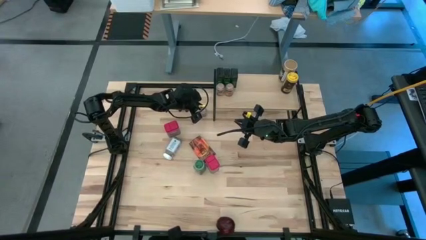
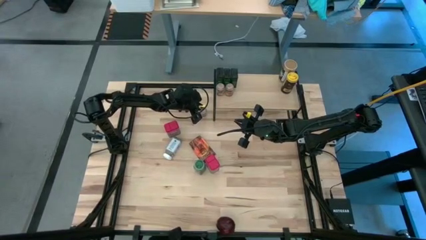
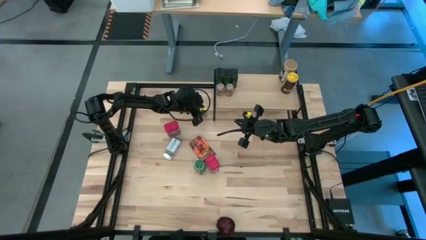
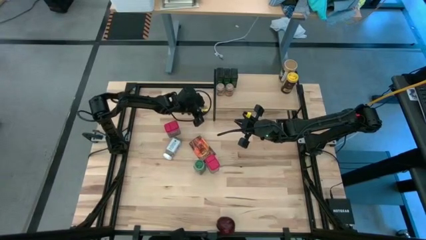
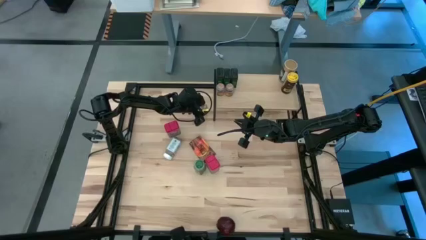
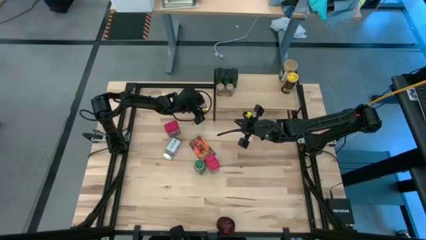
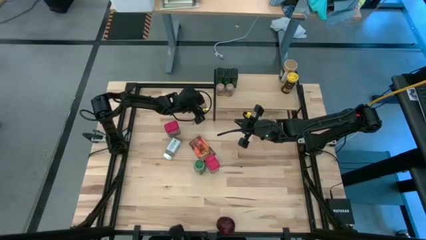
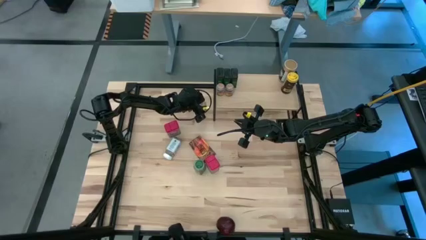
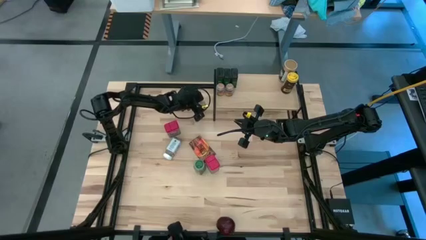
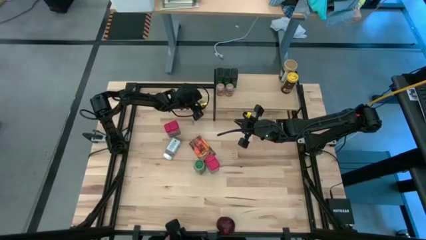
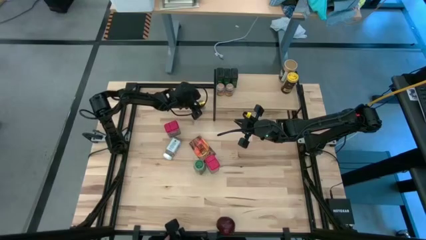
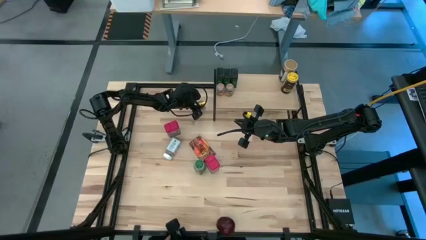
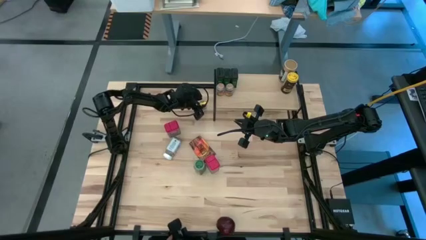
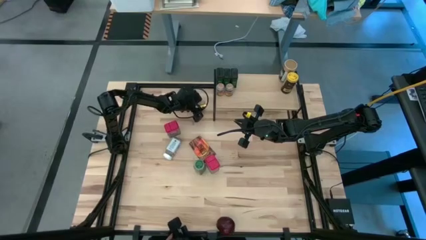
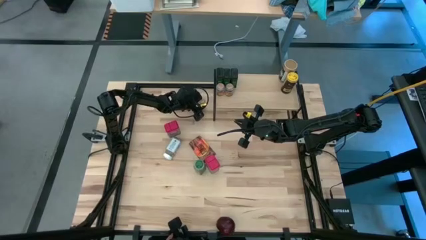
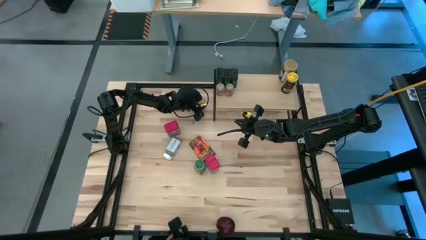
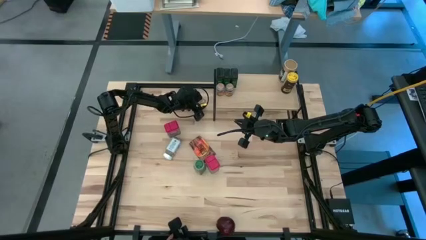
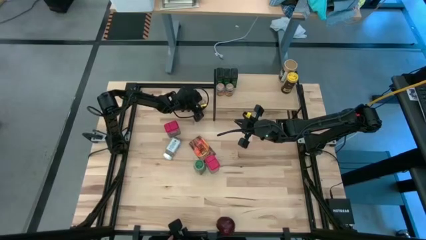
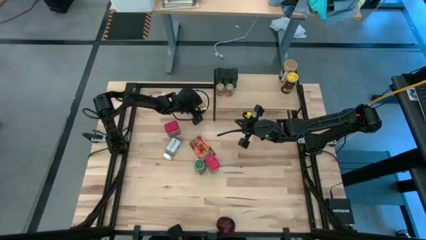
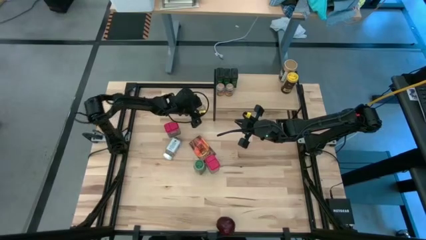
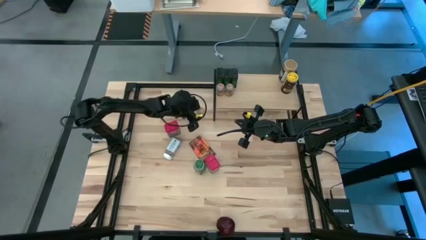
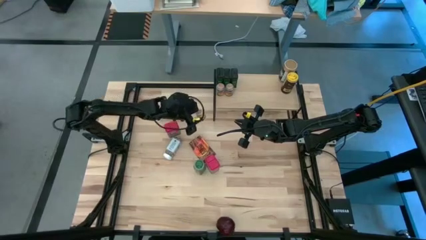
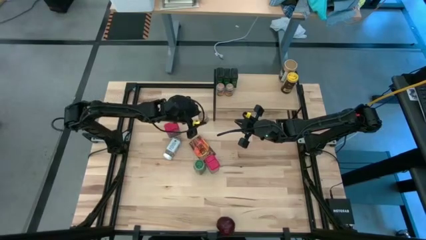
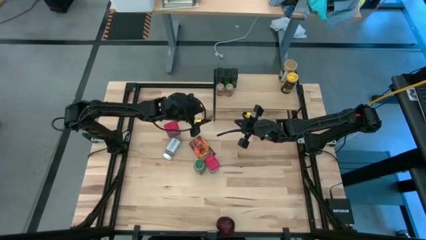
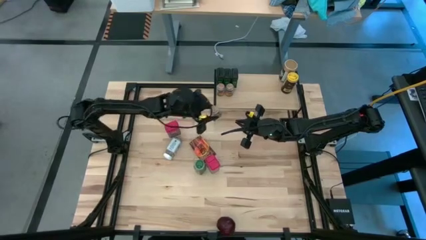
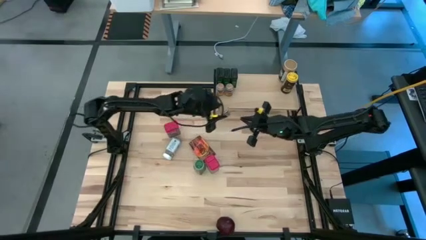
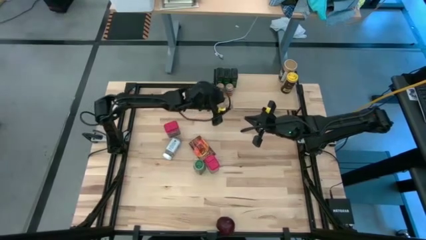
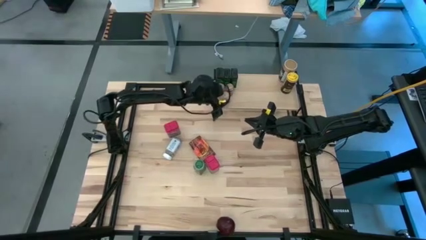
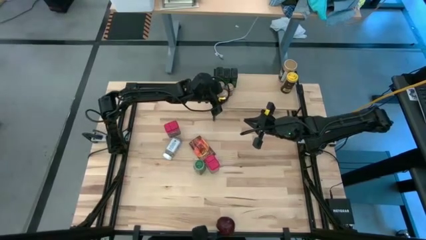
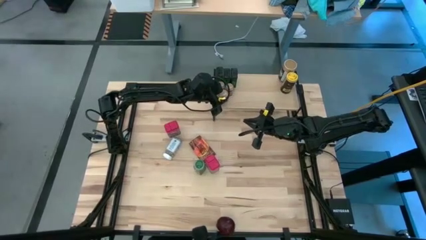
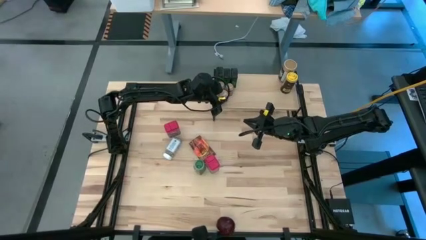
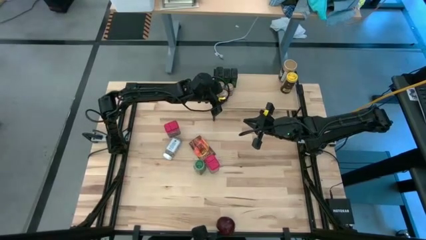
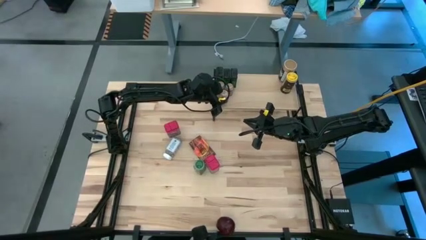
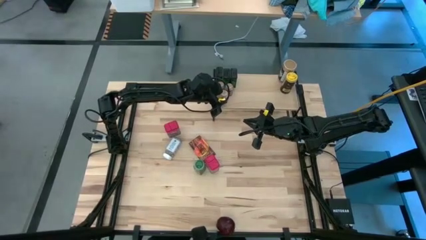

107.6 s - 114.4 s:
Task: Shelf spices
Put the bottom transparent seasoning bottle on the shelf

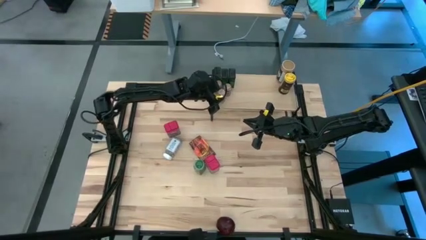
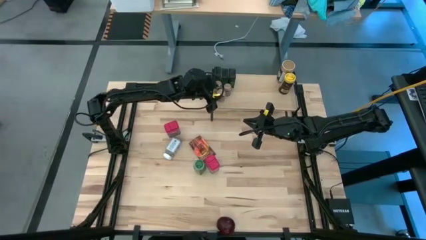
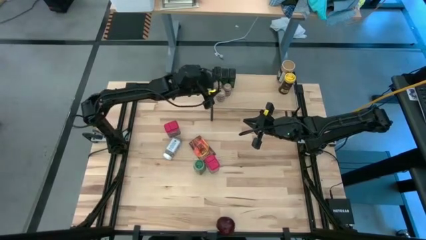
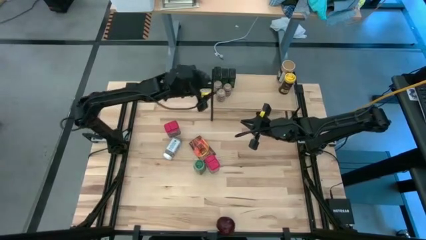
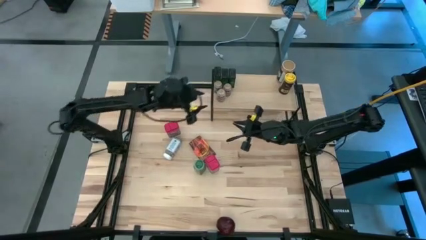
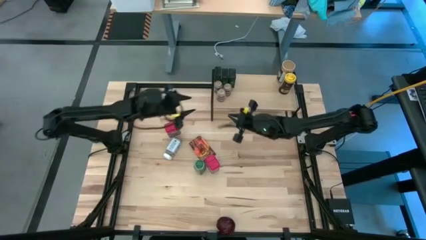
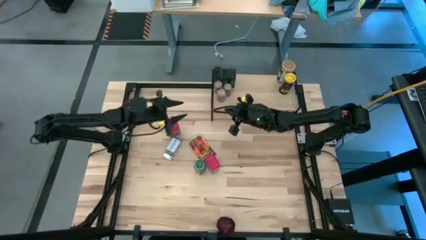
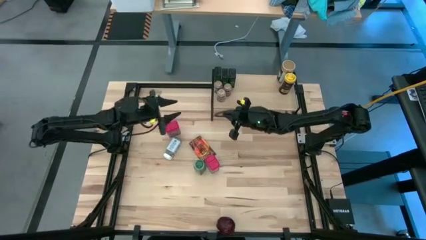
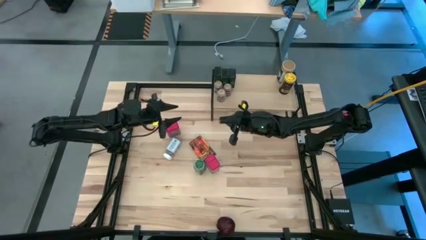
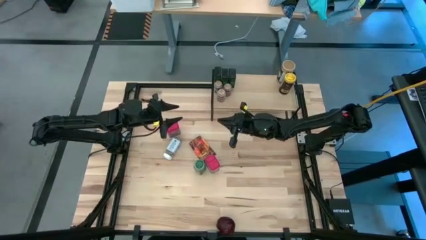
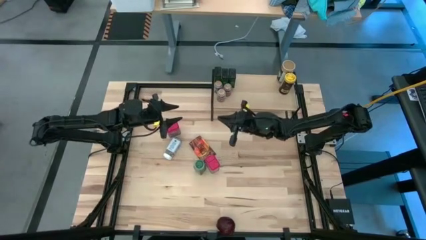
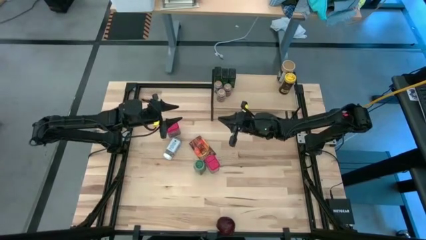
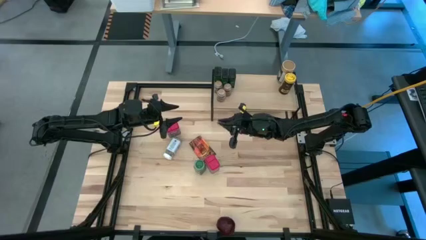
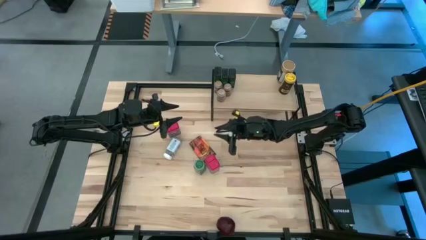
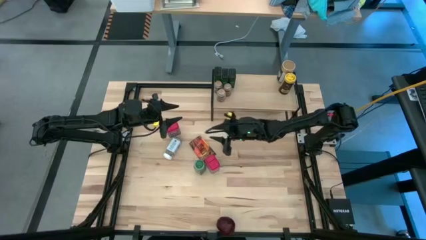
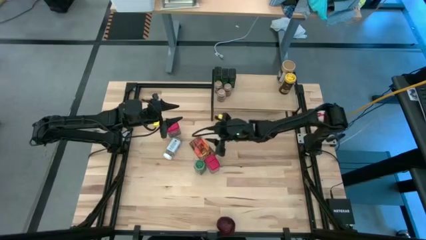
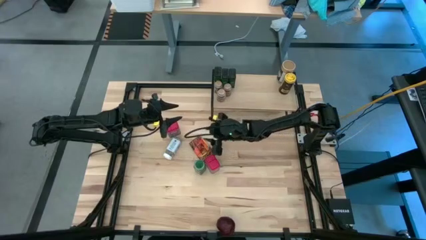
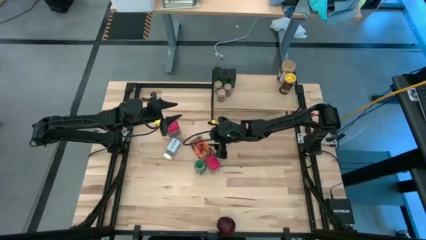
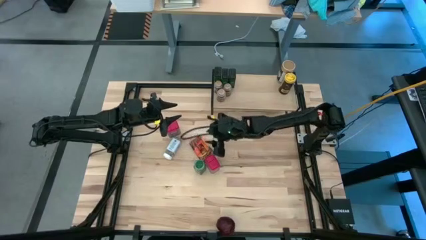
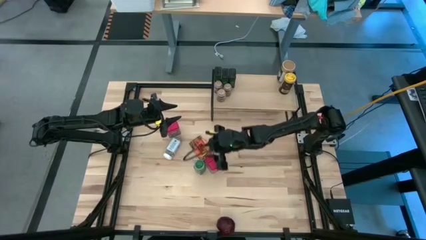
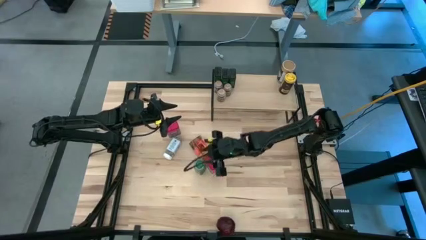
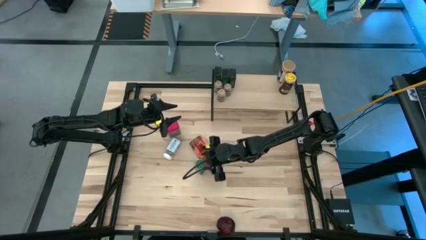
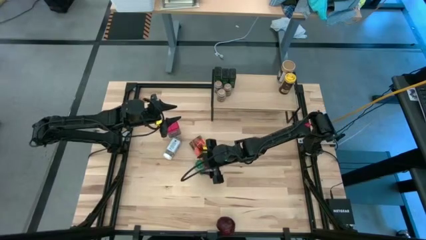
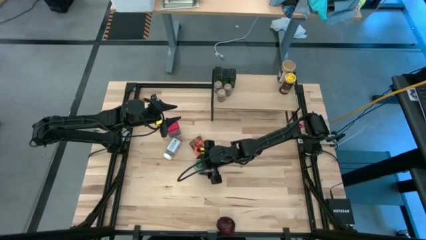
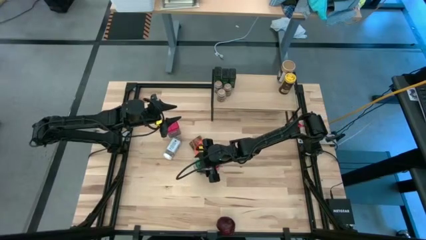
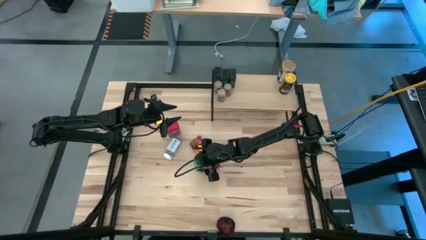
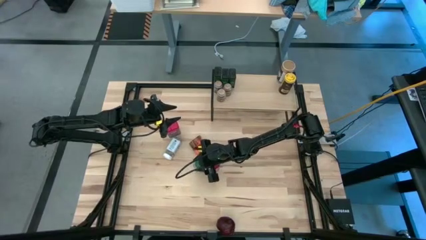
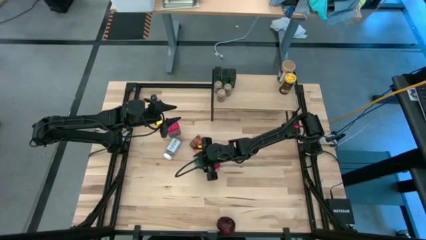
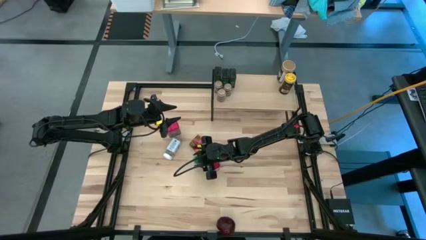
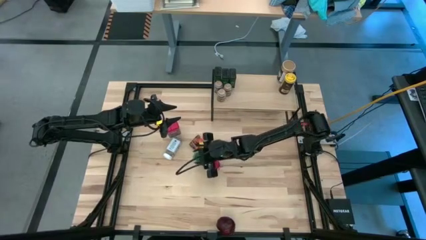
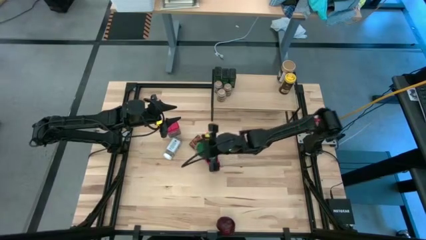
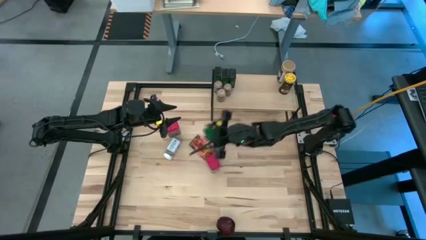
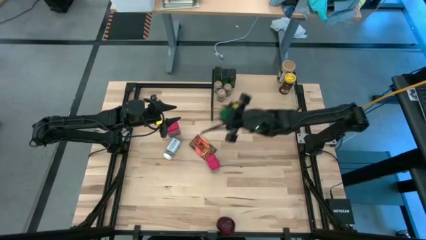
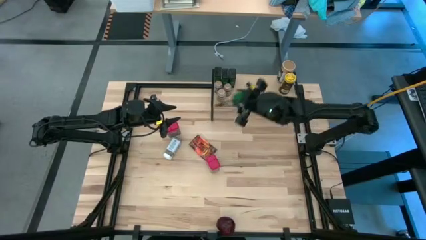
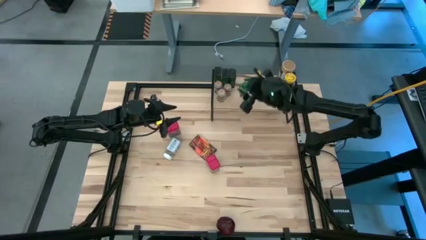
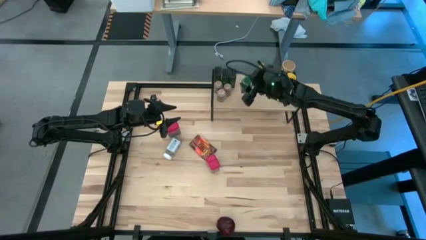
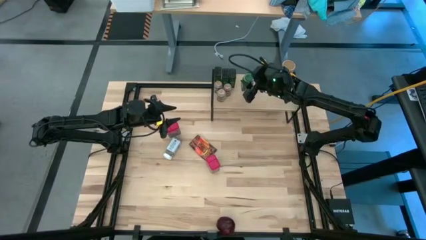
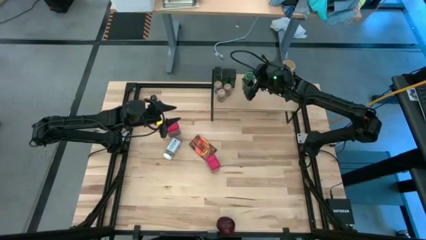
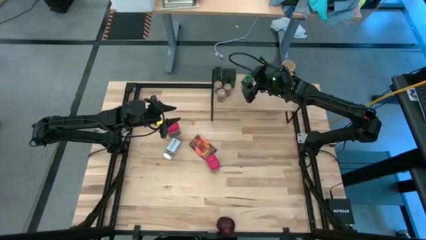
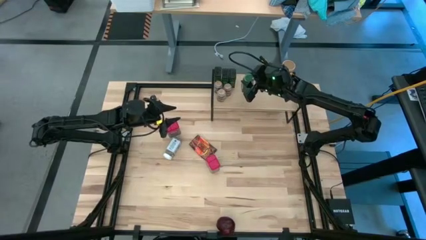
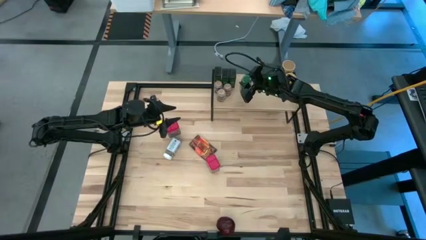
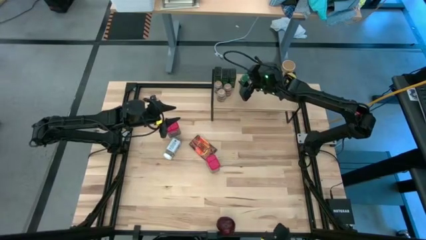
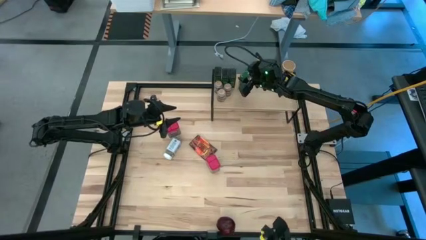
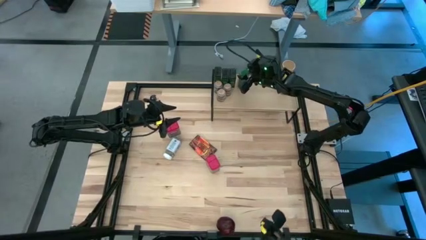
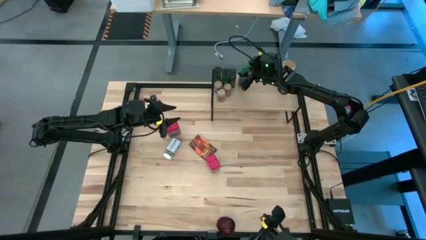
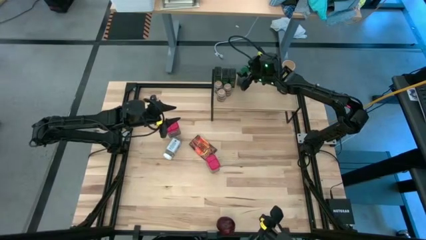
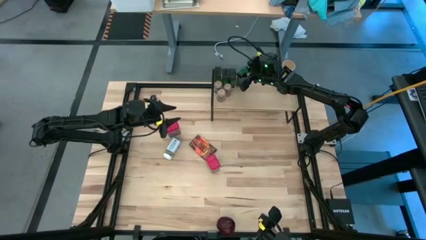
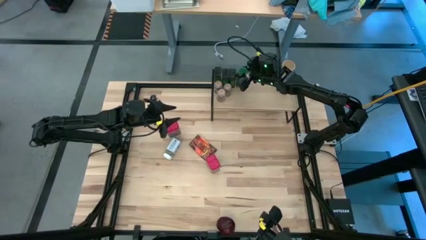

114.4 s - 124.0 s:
Put the green seasoning bottle on the shelf
